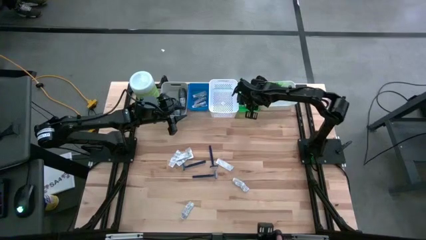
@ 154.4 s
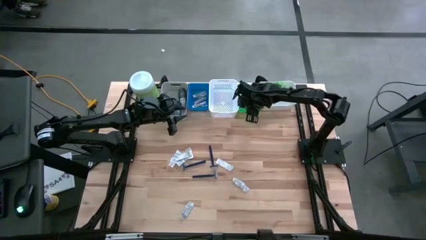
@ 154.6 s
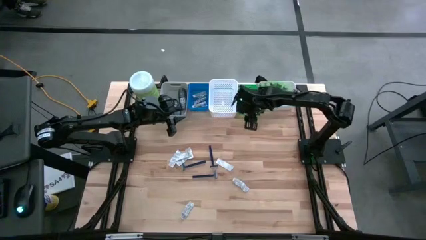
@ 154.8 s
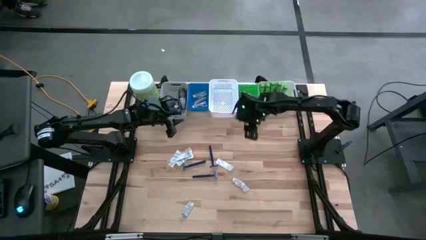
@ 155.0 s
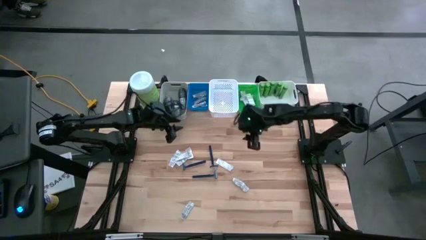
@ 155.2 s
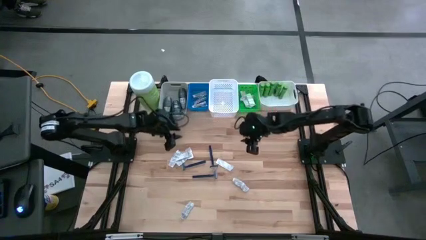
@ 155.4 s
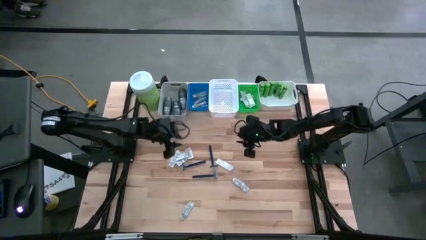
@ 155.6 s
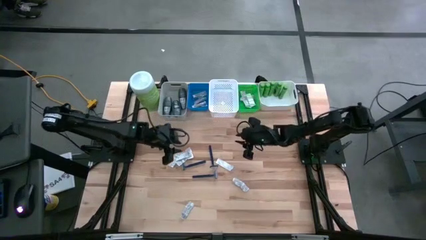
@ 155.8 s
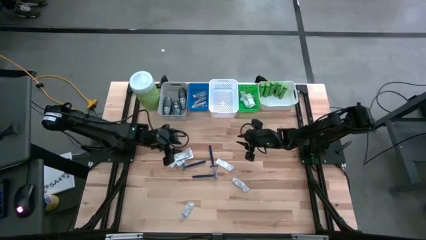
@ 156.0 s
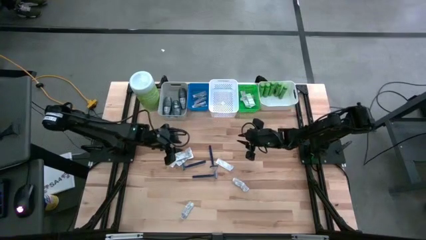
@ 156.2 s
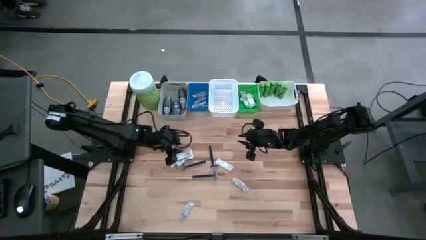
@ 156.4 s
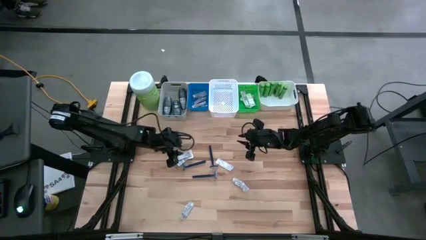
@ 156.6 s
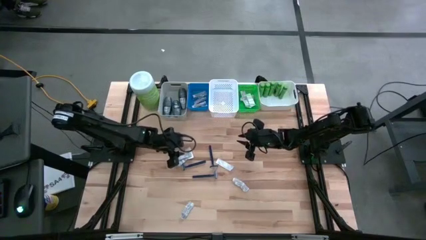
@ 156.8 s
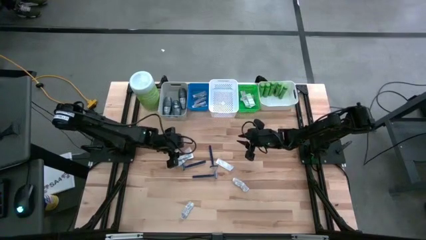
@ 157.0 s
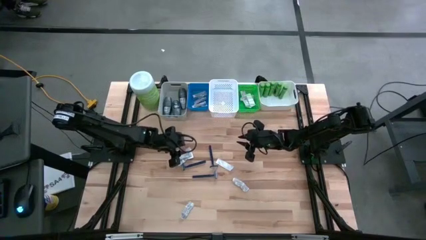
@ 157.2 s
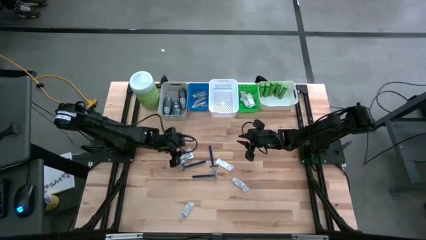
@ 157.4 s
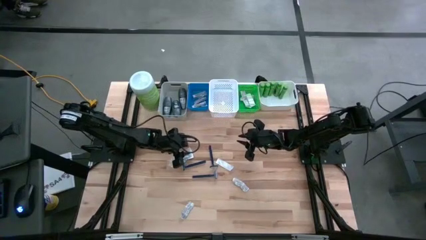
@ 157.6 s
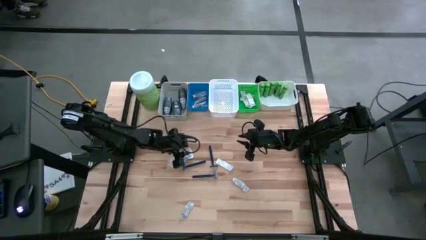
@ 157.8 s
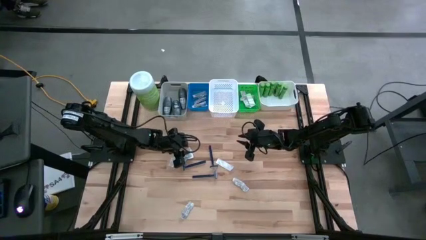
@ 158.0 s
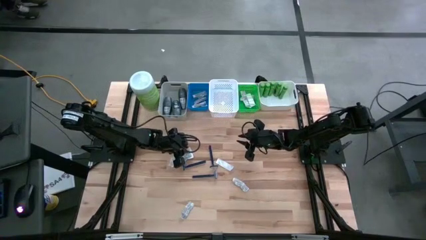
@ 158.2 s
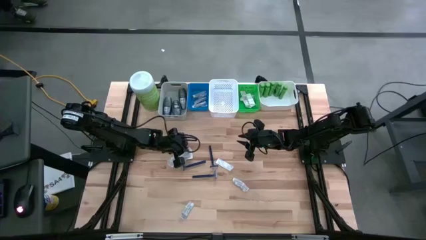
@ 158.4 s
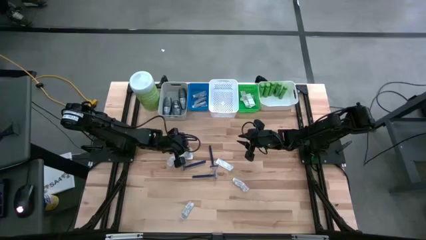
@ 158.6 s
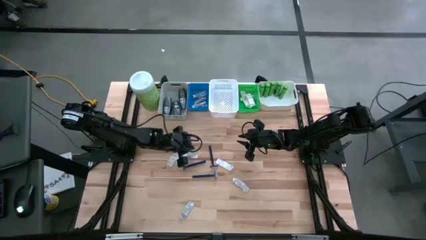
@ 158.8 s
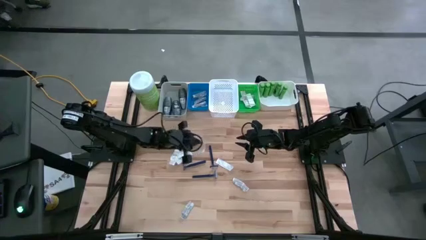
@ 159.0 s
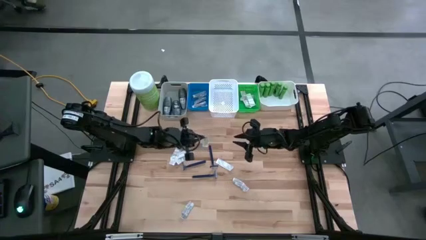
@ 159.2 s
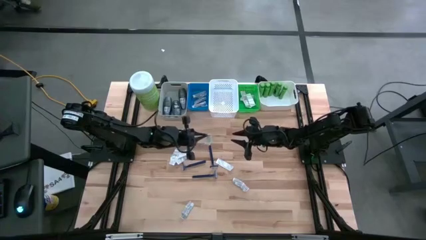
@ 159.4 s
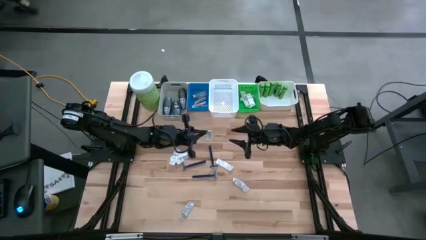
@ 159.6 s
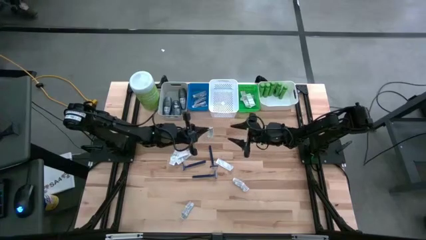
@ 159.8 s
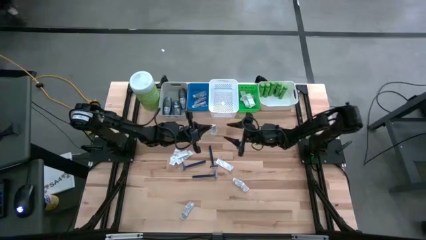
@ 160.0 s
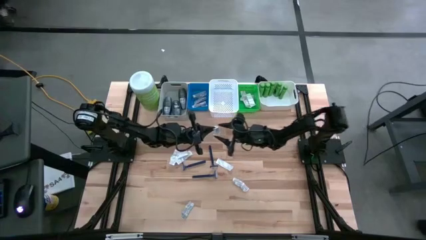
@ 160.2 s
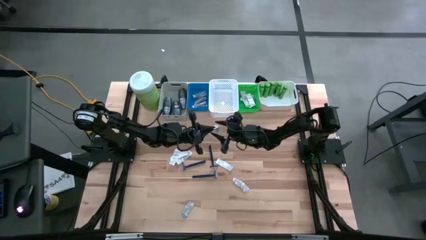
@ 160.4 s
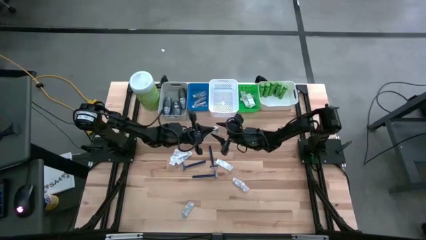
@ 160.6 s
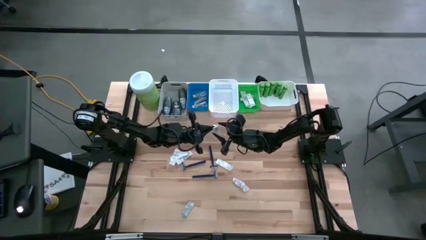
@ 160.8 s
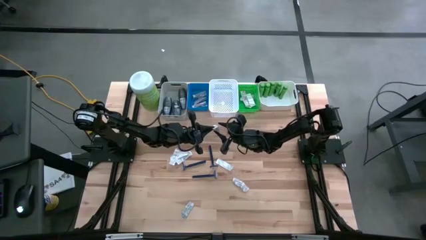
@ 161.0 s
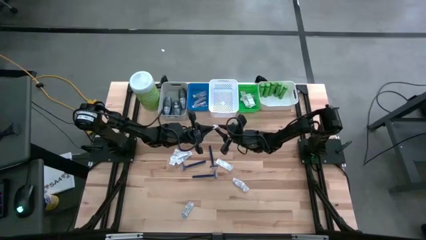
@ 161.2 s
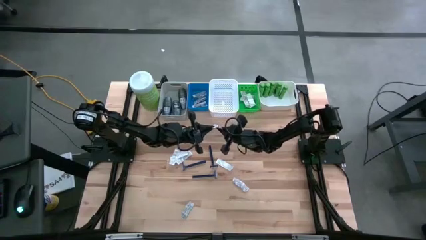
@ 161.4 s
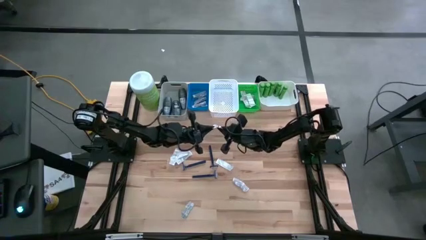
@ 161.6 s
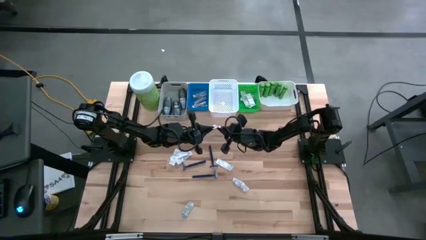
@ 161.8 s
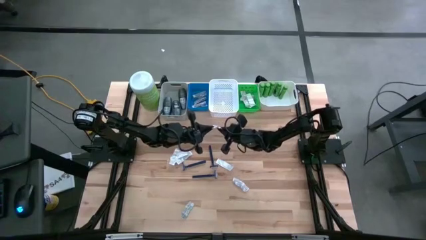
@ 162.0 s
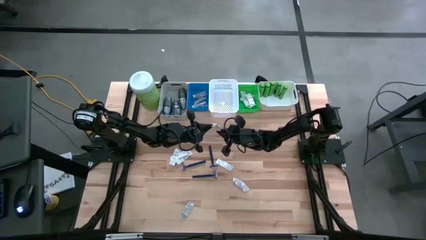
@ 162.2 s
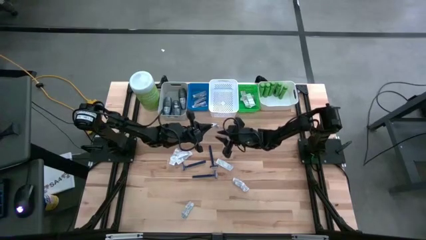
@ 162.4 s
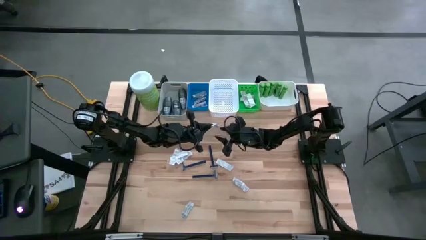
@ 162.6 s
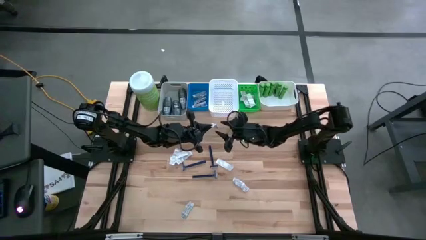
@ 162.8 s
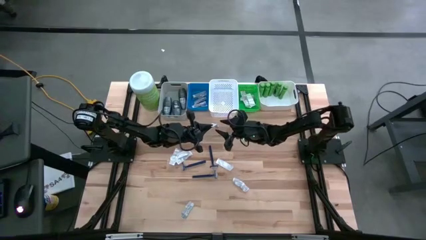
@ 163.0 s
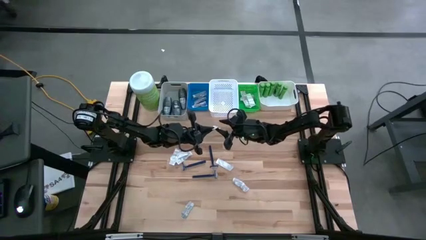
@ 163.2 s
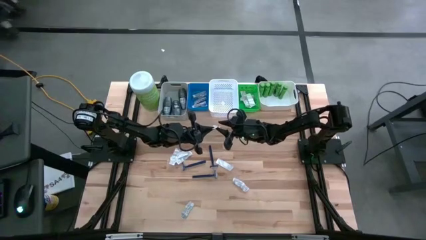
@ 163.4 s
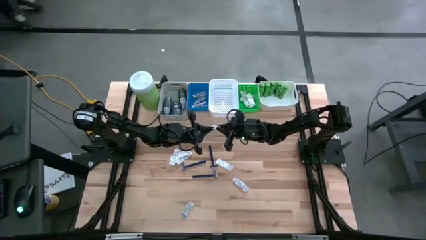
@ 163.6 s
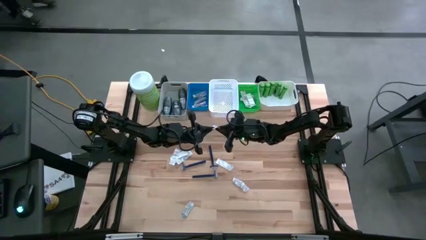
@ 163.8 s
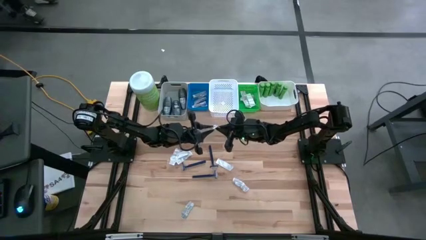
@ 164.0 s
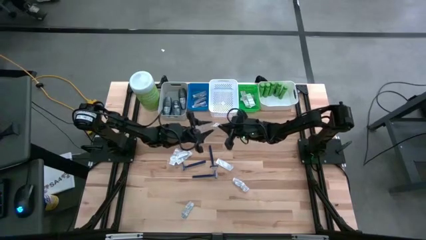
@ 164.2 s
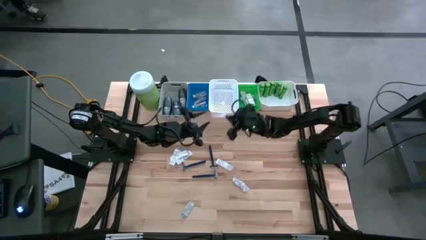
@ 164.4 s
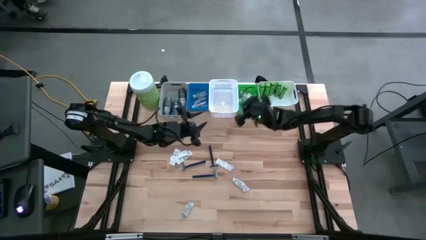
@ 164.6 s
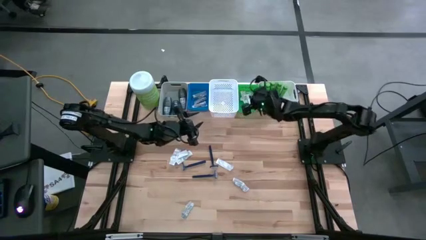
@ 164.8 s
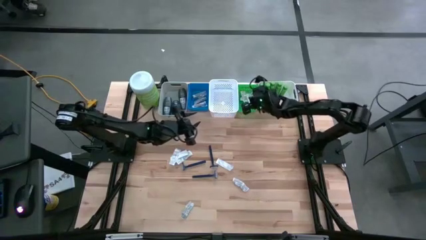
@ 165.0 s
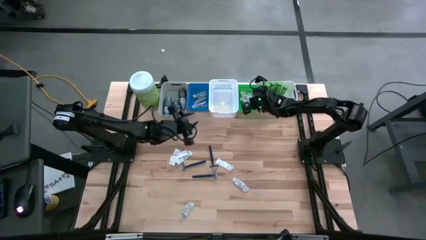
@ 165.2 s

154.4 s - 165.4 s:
Task: Pick & Place Travel size toiletries
Put the white bandage pack into the green bin

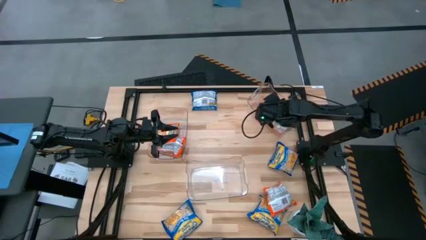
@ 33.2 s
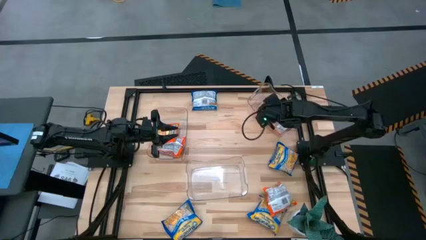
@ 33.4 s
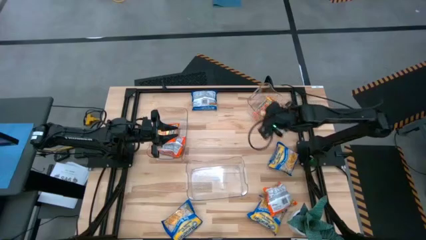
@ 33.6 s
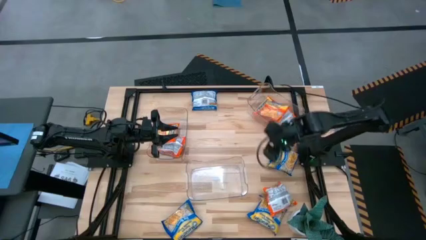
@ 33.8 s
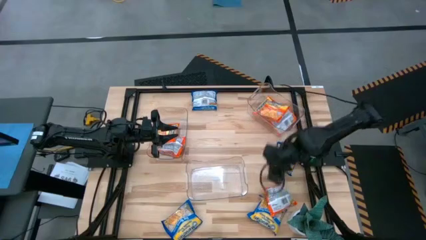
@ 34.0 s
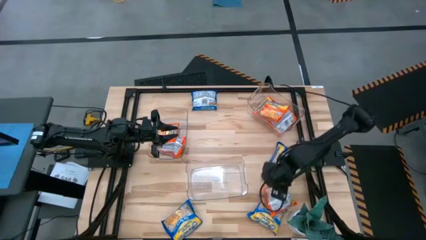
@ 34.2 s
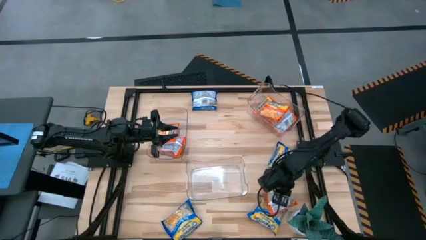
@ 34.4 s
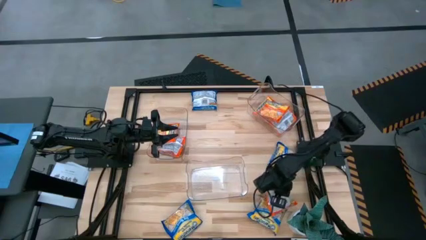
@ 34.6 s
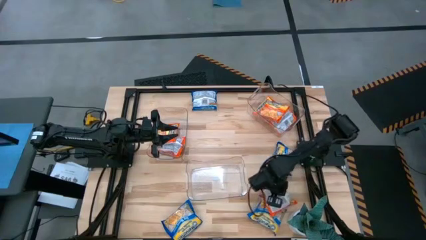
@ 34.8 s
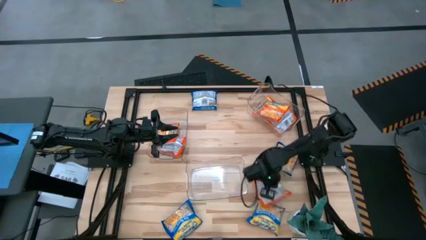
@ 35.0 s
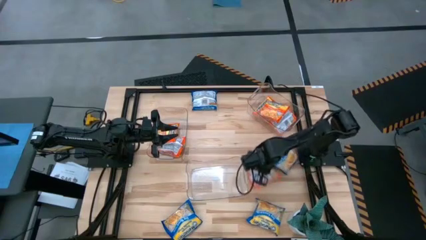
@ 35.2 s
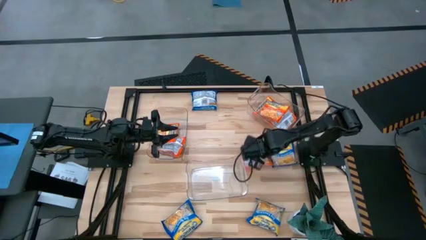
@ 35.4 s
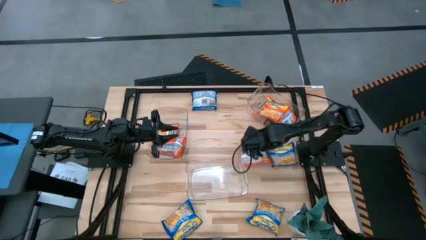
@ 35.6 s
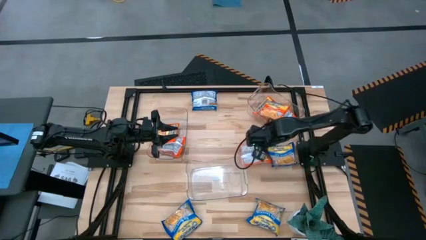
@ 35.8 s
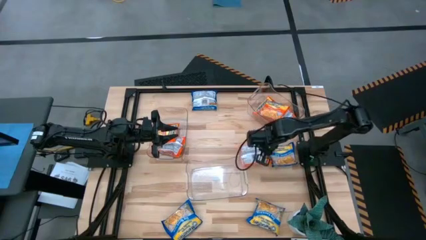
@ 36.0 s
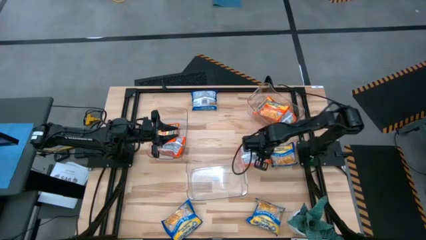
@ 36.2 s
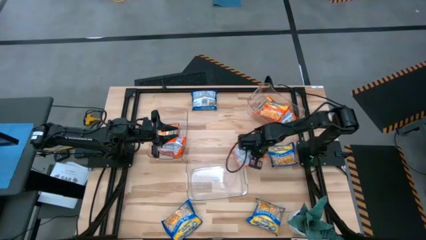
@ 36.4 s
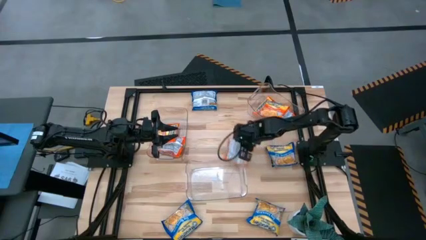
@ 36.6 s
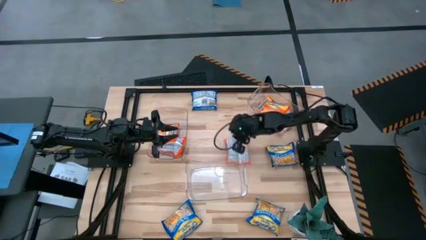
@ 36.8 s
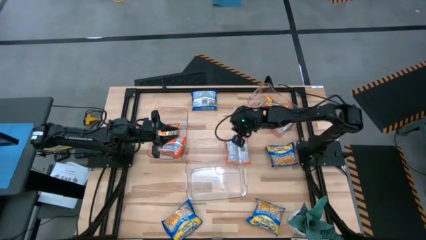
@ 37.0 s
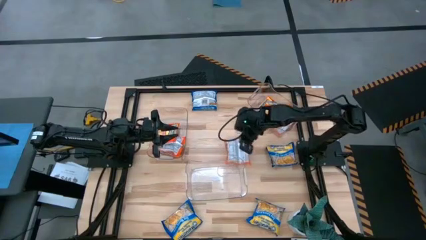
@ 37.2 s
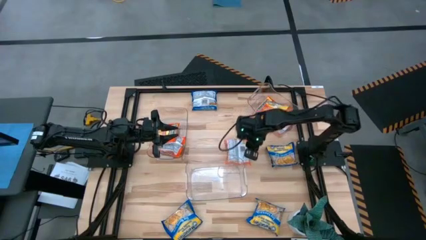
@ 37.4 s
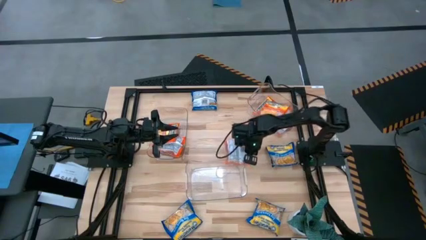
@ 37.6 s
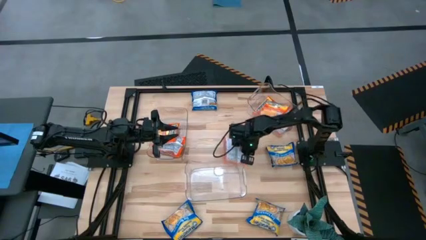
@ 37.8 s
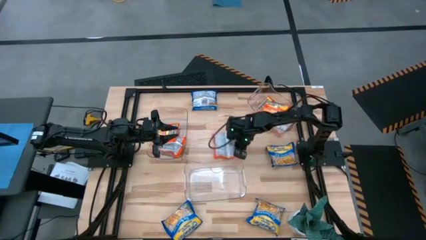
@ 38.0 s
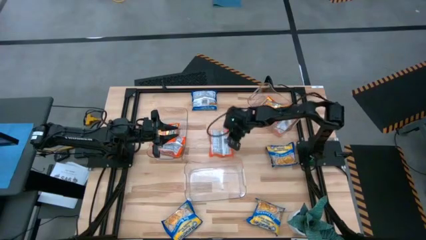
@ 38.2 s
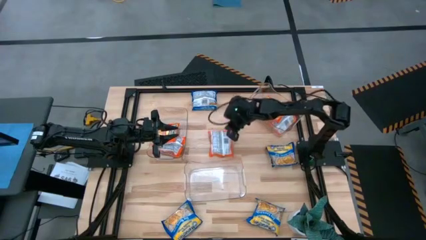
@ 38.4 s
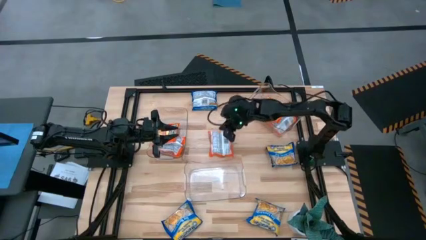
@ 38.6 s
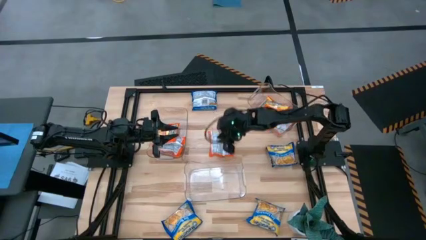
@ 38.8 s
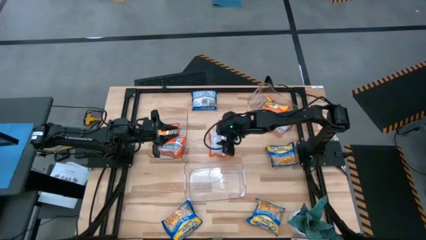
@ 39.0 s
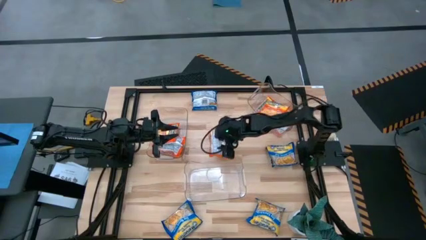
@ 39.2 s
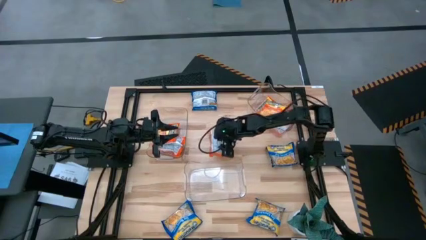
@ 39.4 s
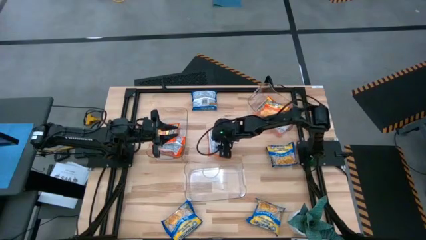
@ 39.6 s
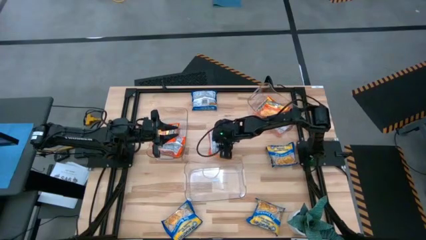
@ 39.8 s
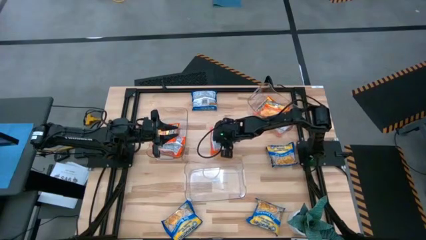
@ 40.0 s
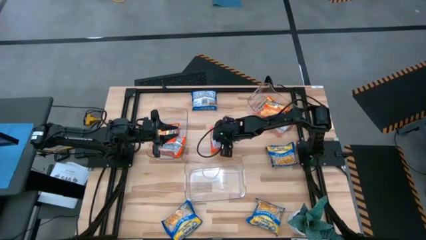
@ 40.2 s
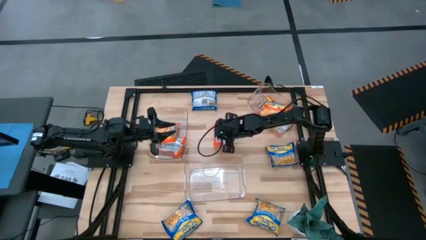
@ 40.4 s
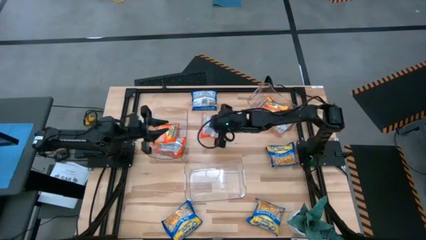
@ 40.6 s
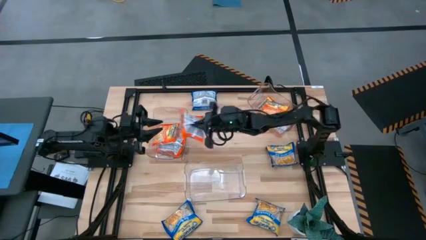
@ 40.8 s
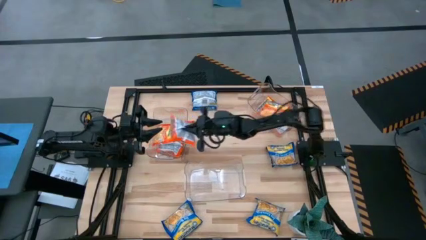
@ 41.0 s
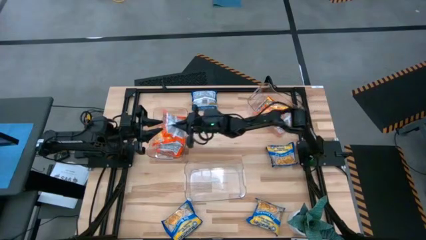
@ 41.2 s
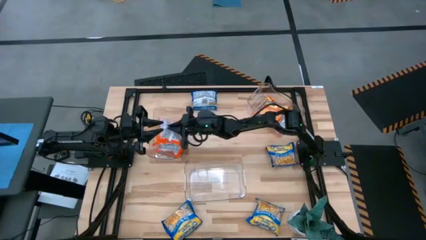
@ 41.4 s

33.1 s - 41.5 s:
Task: Sort Maruchan noodles
Put the orange noodle pack into the middle transparent bin
